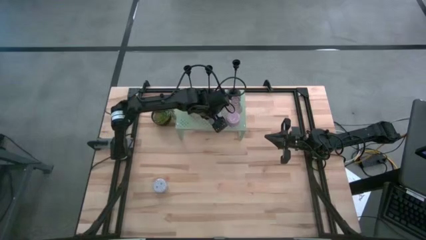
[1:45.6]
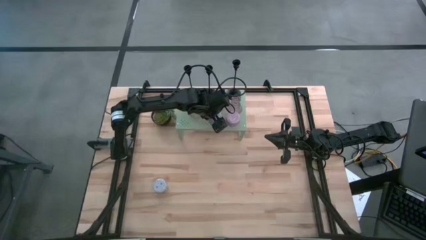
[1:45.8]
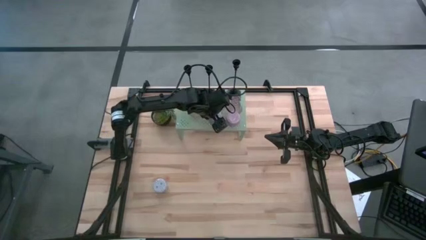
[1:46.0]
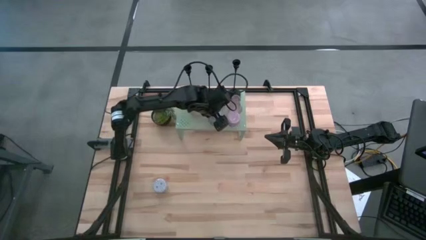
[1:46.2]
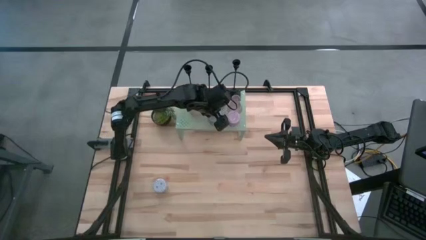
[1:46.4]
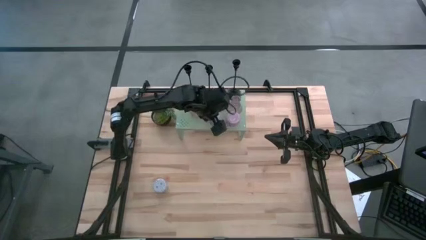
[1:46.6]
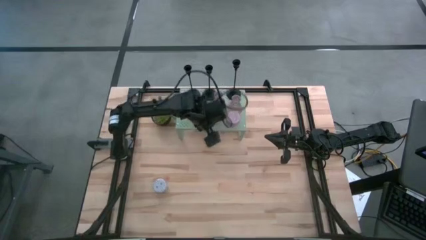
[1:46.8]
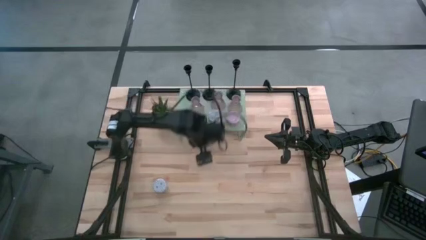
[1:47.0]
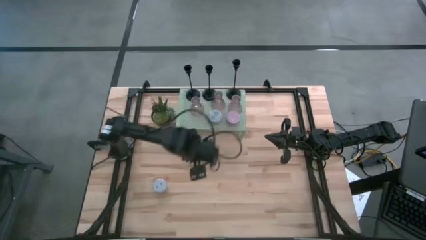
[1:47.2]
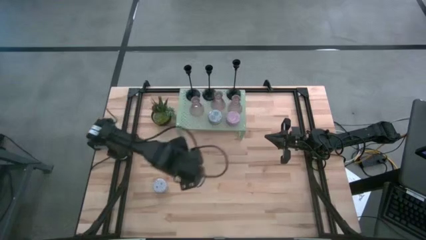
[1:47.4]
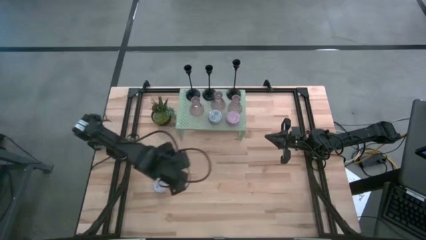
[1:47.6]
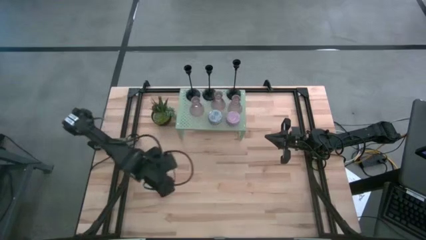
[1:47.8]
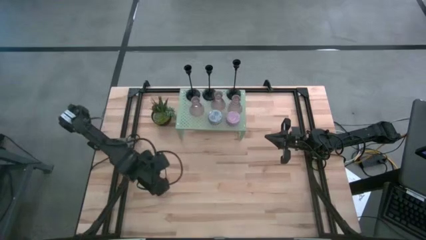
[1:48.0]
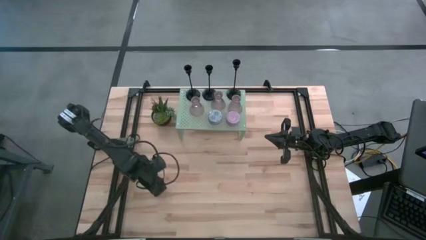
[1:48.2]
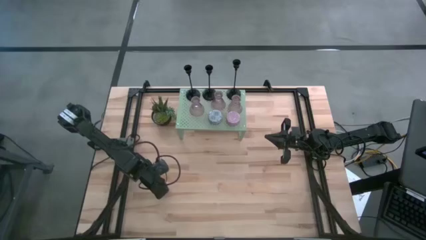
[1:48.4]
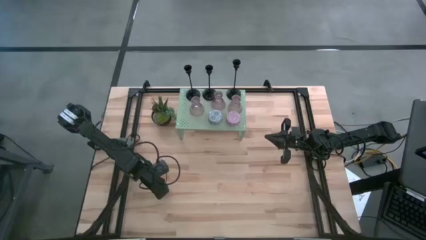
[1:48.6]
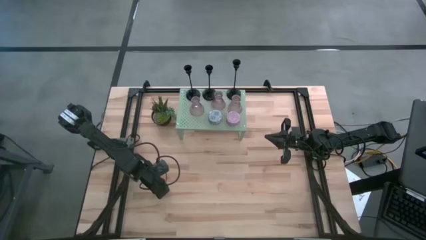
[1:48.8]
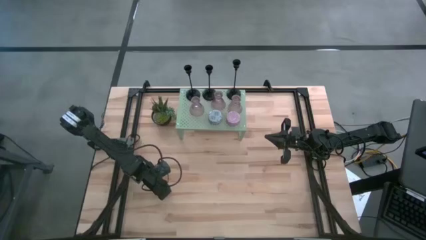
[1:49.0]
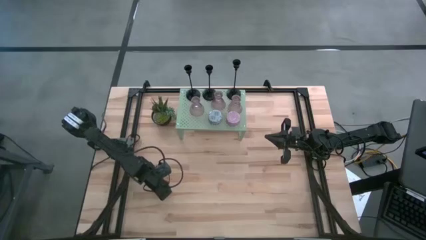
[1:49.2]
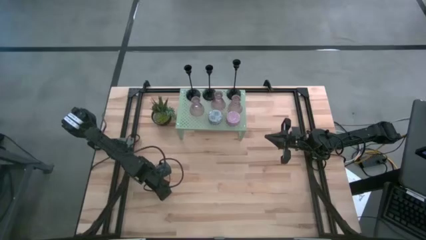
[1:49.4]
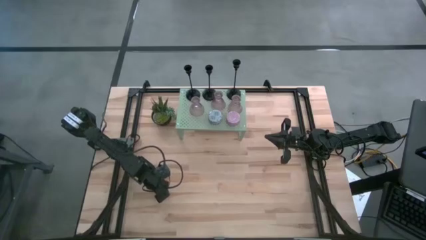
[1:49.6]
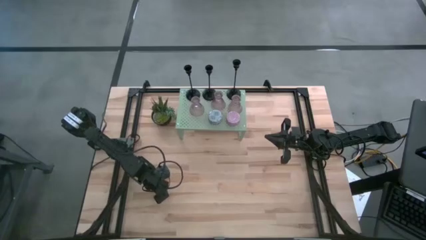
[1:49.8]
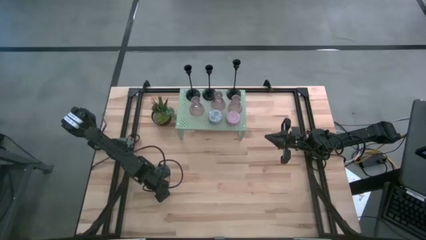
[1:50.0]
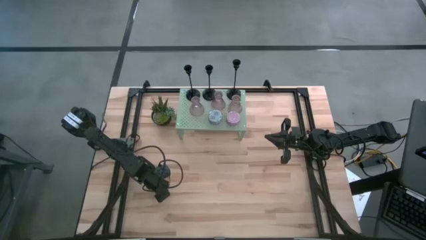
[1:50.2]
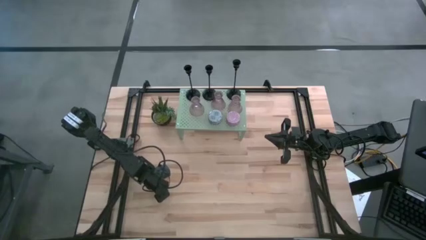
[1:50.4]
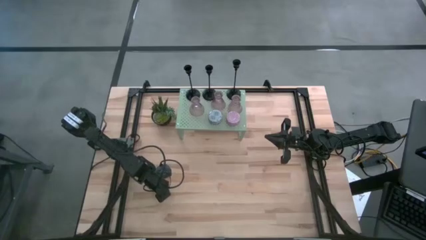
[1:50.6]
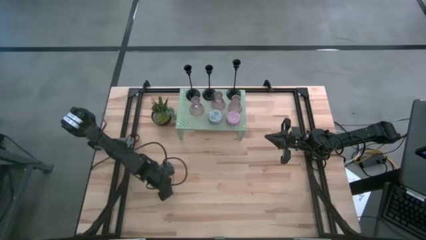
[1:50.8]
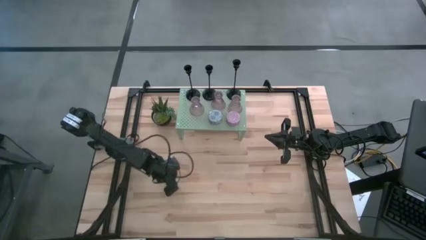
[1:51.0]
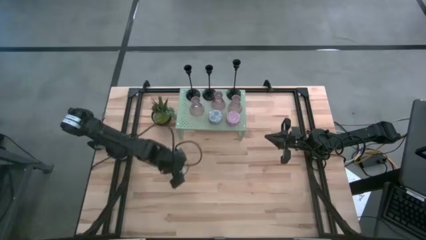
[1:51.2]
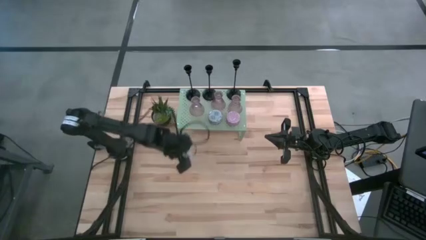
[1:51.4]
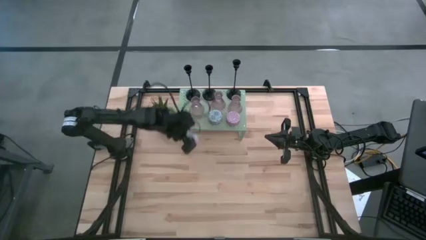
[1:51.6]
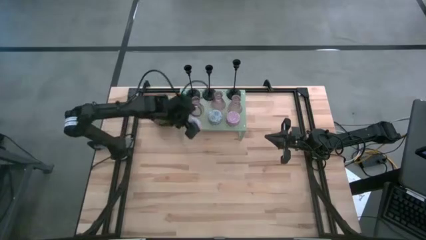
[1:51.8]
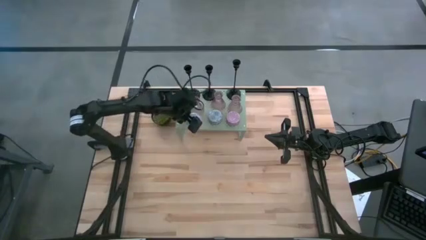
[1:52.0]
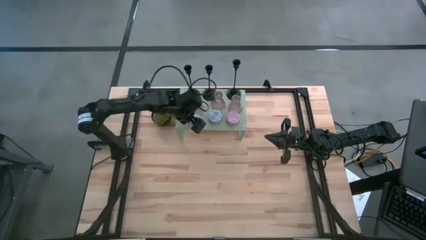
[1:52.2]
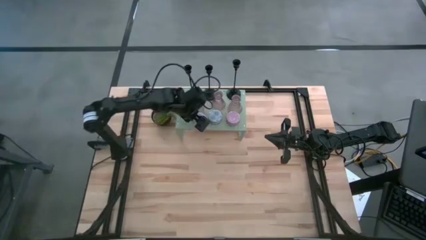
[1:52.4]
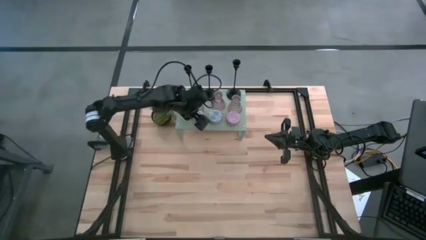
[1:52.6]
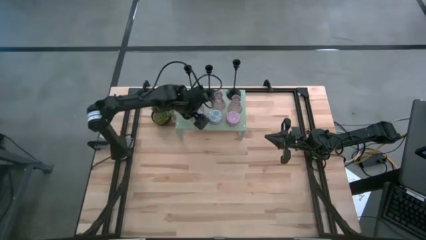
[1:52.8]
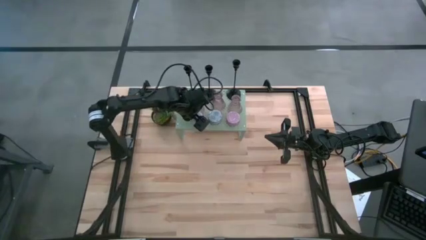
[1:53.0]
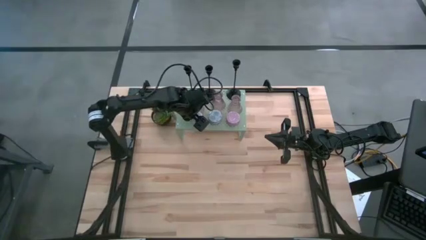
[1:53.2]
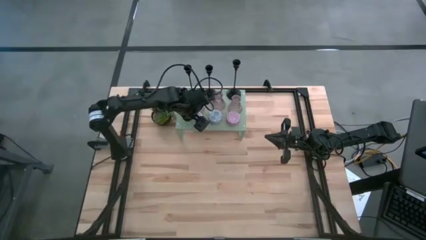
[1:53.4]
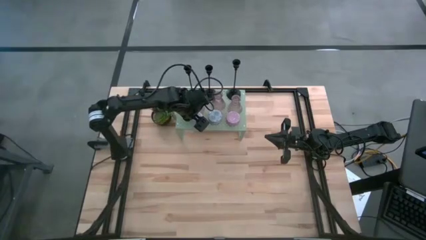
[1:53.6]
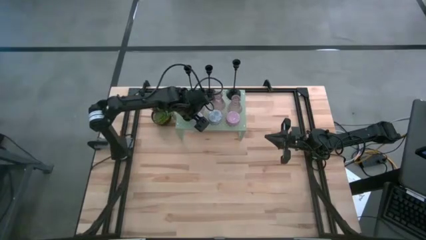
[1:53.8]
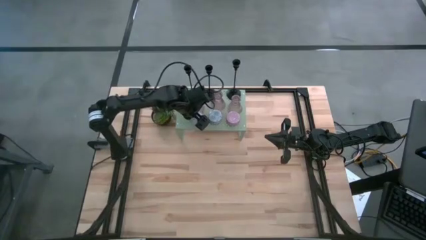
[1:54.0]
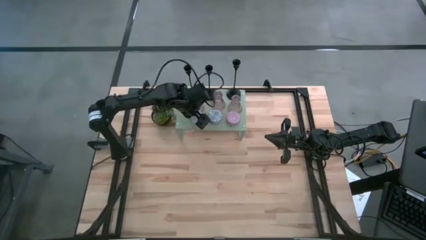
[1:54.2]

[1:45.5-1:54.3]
Task: Pick & Place candle stick holders
Put the light blue scented candle on the shelf aligned with the transparent pink candle holder

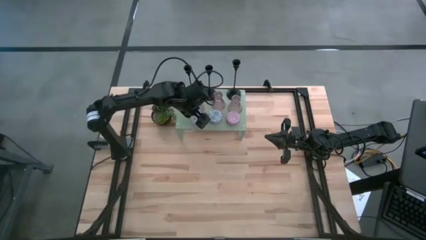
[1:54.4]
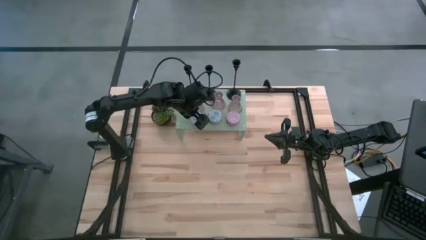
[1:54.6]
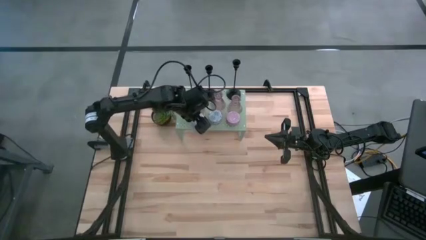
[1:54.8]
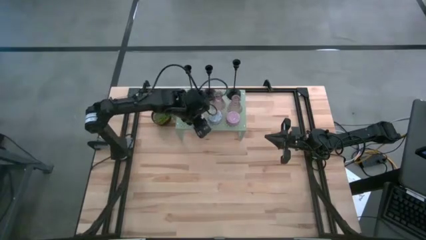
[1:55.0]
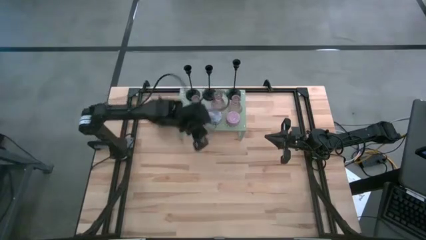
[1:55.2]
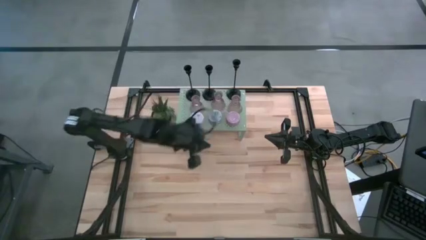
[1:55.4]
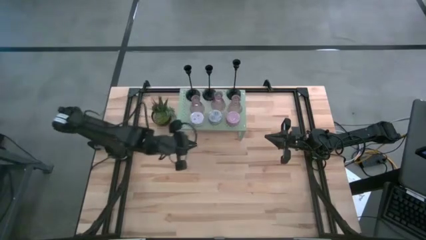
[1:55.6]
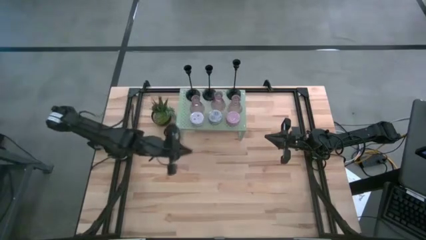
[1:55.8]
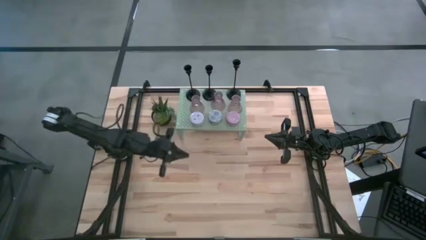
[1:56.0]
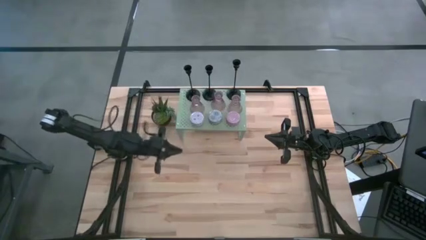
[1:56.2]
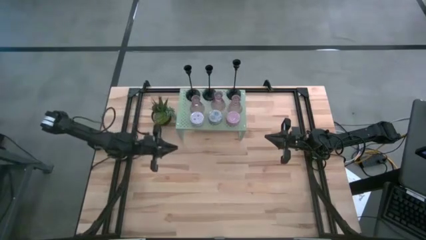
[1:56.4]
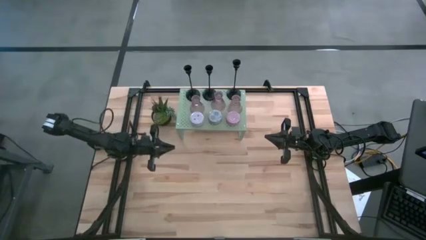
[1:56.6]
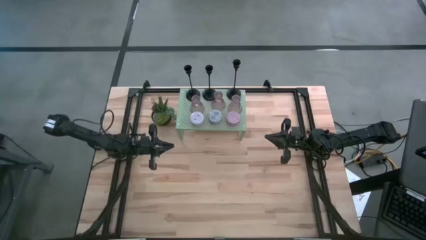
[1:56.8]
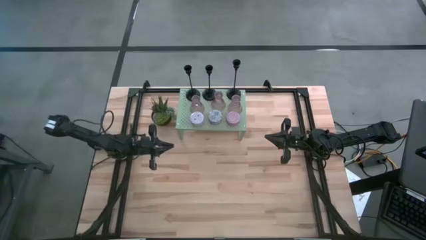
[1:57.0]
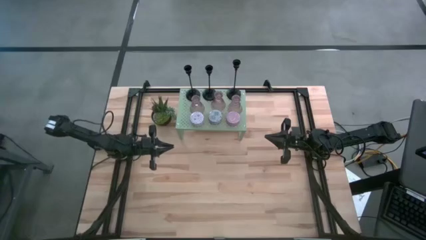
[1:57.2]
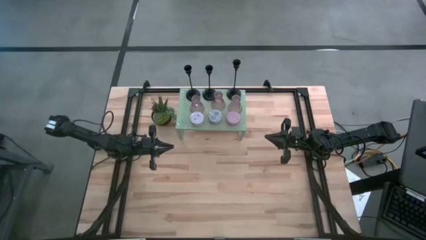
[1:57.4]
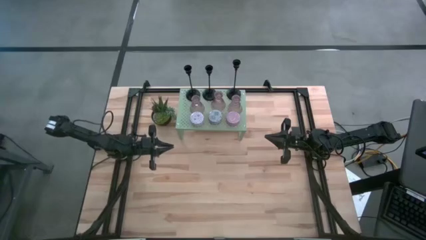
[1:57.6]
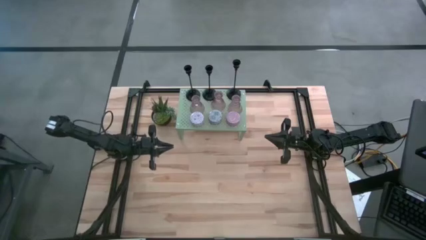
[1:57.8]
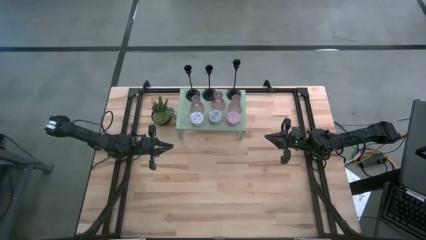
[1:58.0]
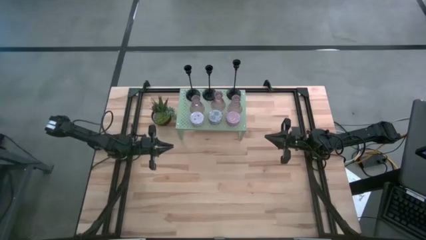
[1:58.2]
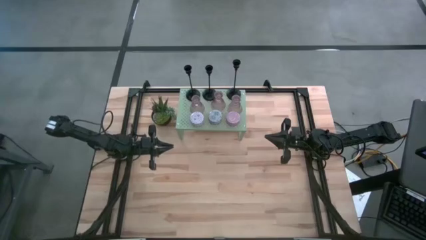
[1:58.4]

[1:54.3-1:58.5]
Return to Home Position

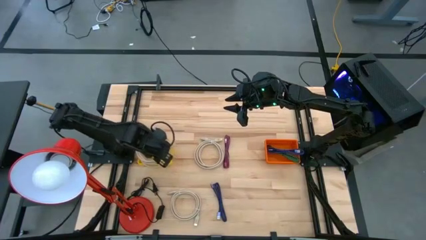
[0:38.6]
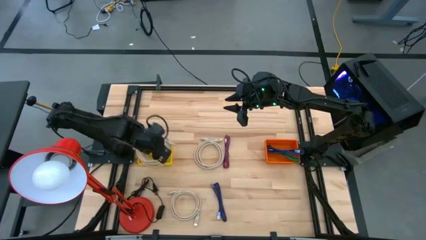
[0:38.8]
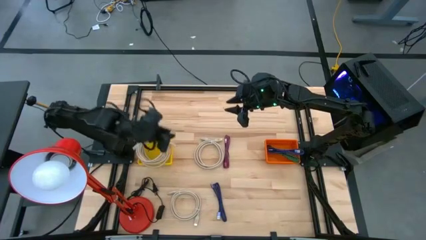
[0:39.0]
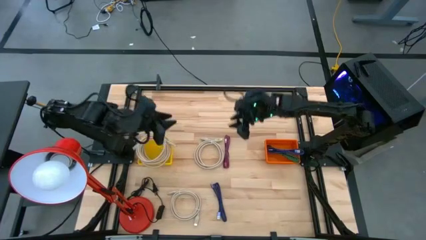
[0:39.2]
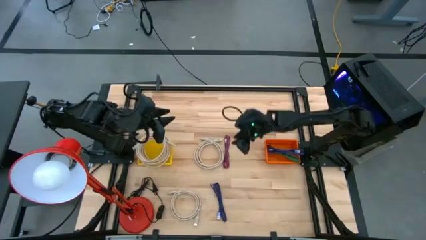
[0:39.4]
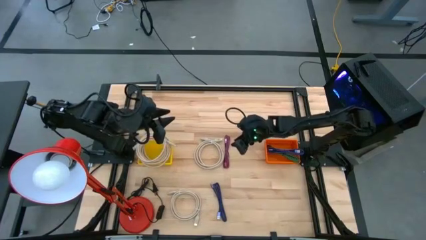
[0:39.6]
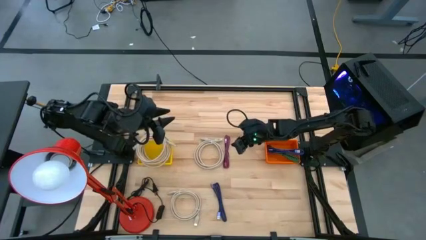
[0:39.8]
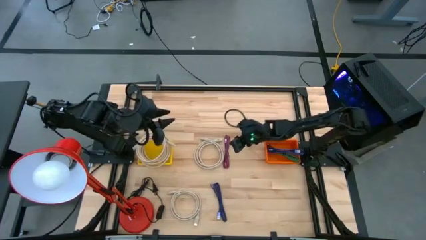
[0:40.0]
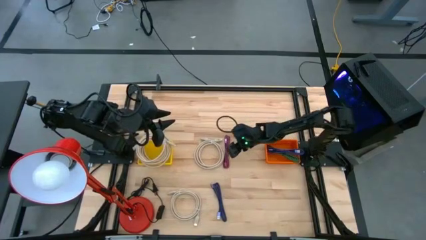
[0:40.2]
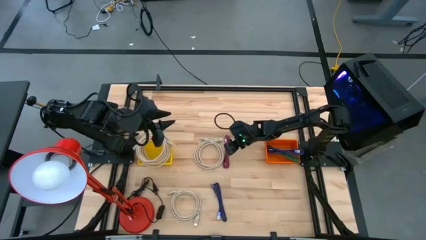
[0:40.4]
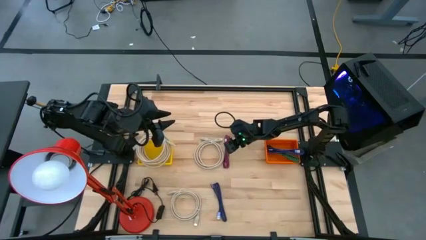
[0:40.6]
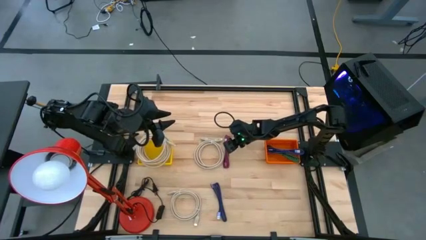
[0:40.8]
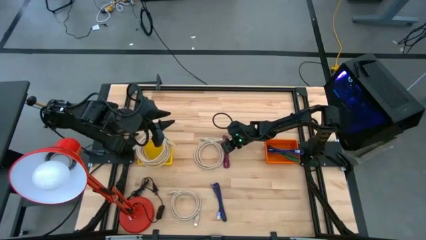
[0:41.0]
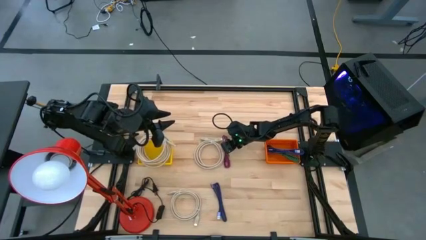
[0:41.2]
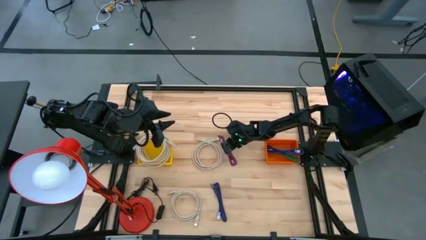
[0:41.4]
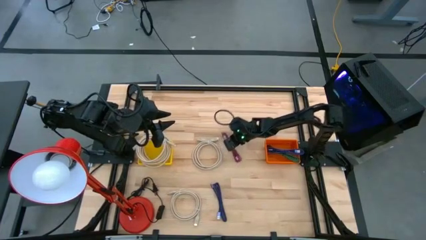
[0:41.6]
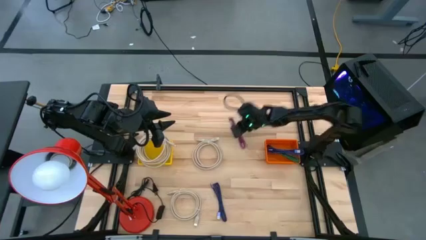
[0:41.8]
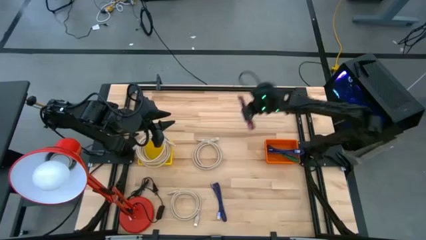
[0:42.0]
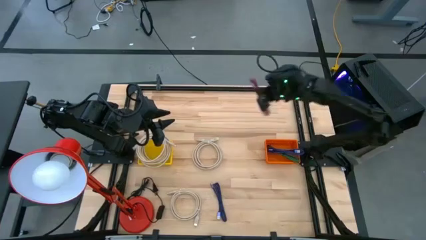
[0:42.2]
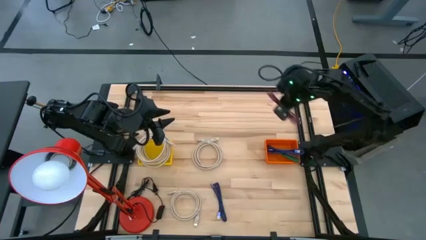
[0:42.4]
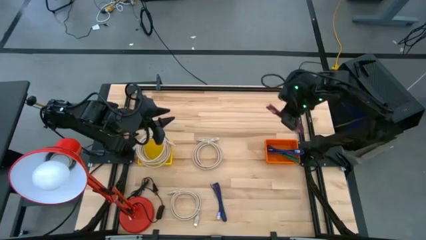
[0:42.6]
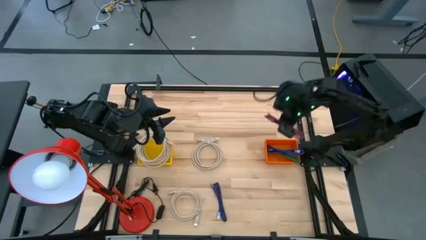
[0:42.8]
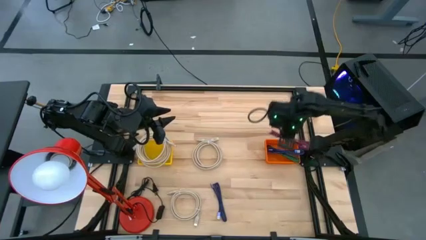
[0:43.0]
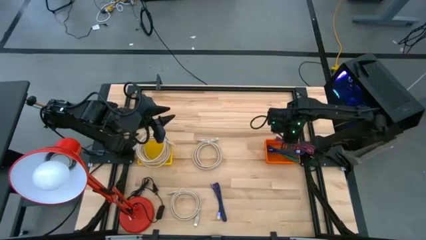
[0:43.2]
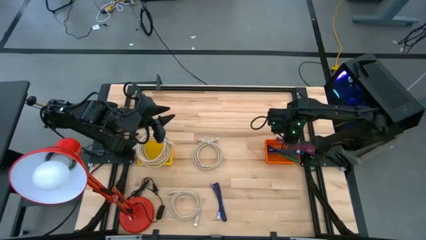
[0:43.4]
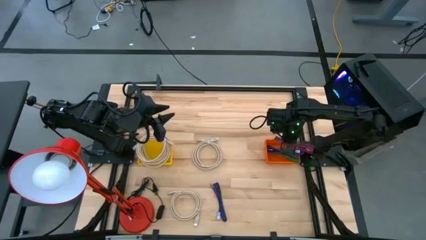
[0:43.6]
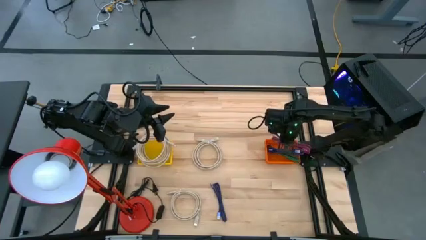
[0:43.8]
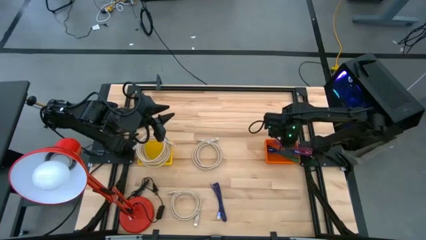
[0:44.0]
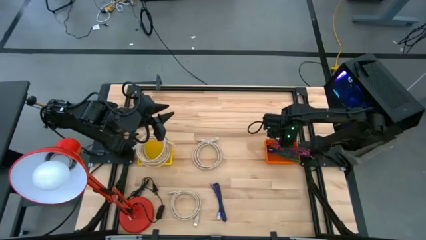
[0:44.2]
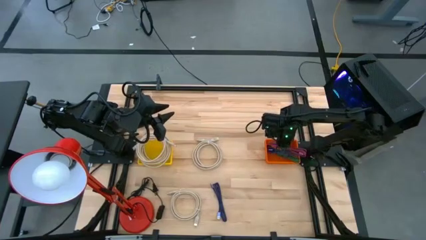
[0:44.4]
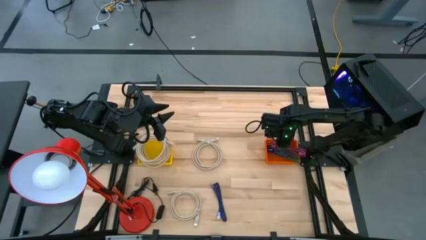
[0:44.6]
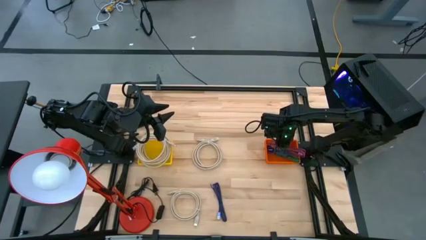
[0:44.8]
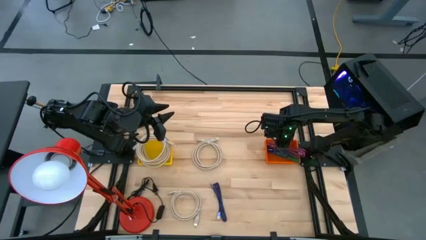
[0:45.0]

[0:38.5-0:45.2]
Task: Pick & Place USB Port
Put the black and pink charger cable into the orange bin
